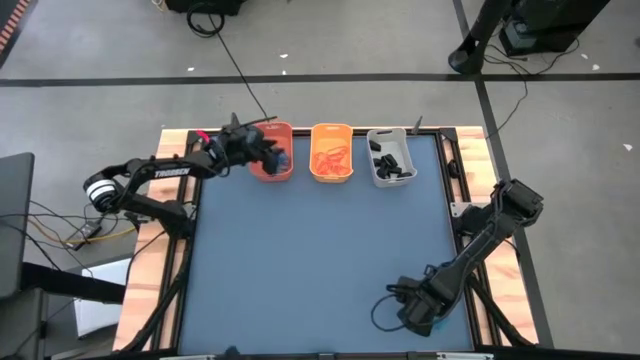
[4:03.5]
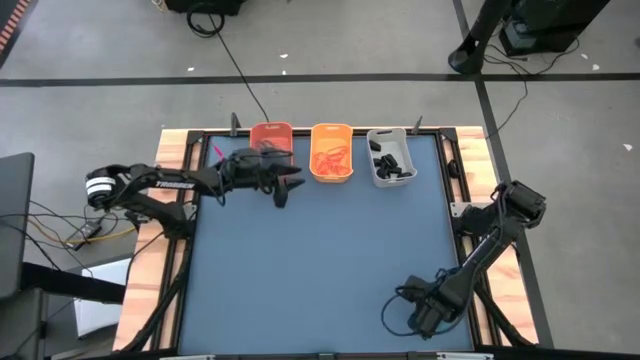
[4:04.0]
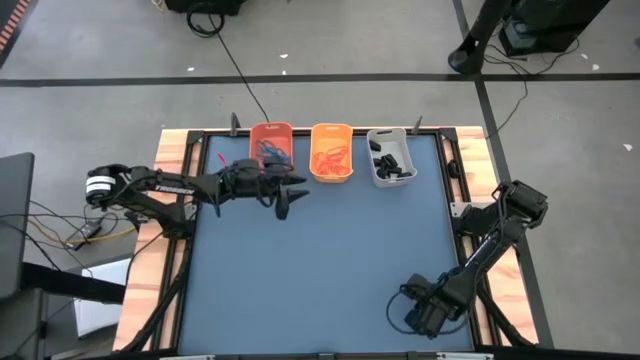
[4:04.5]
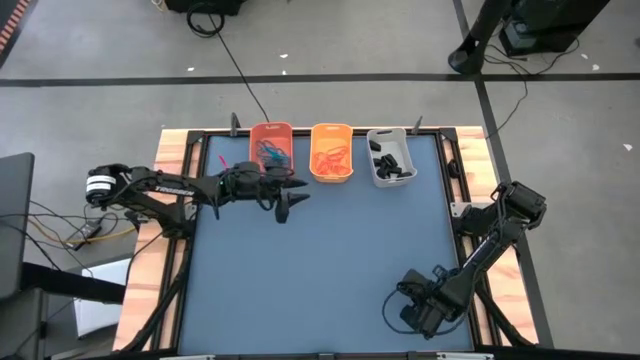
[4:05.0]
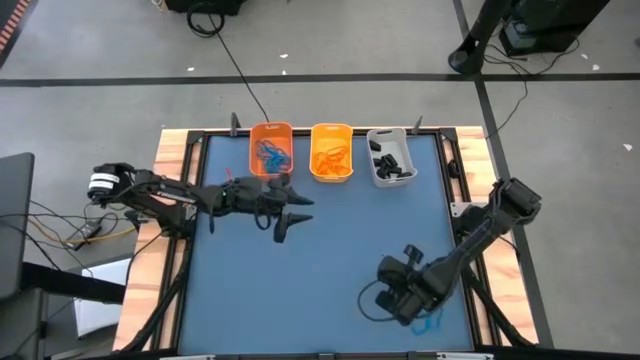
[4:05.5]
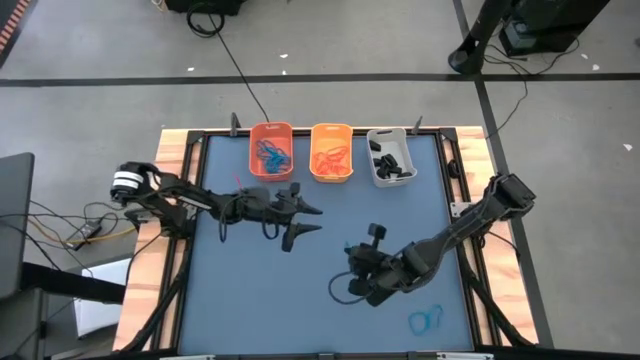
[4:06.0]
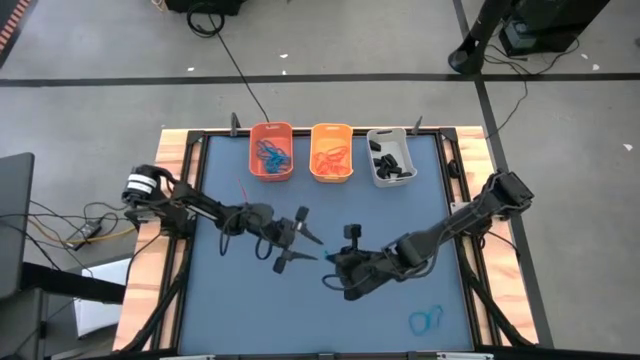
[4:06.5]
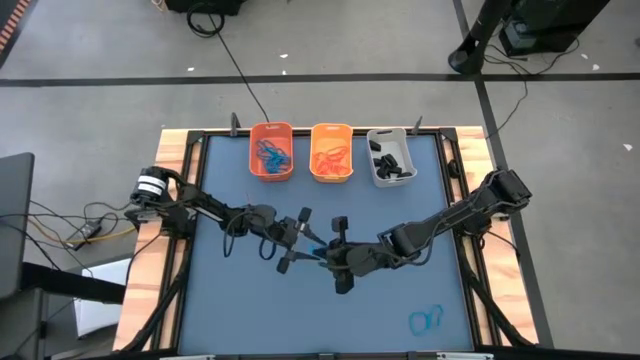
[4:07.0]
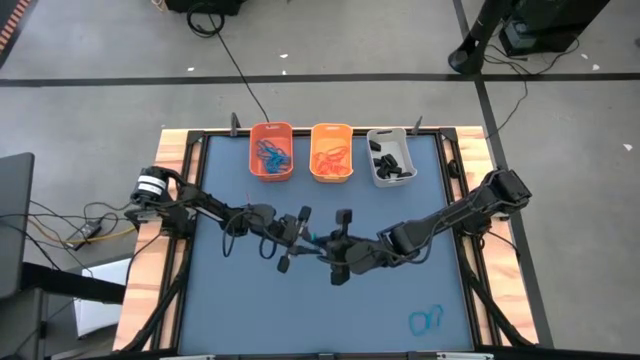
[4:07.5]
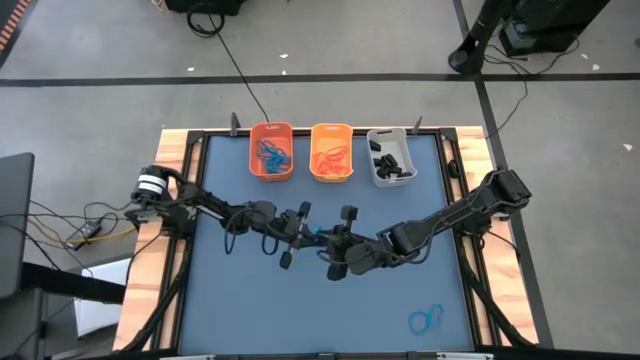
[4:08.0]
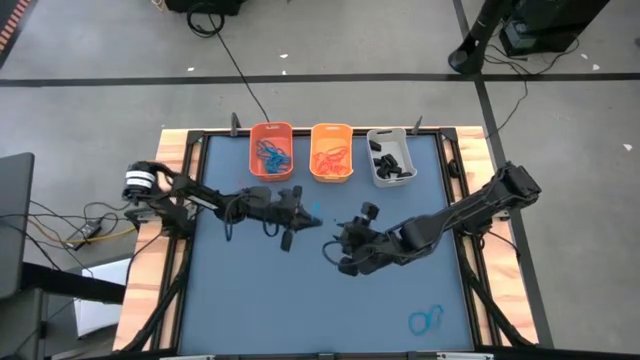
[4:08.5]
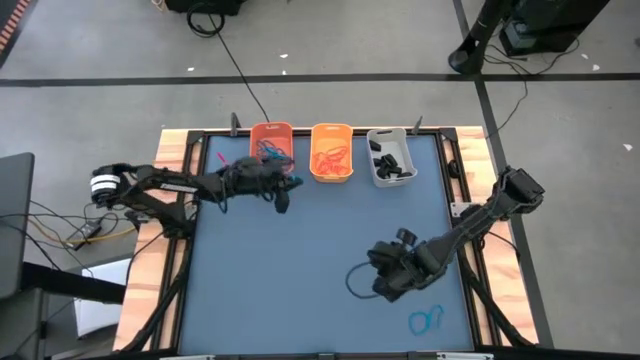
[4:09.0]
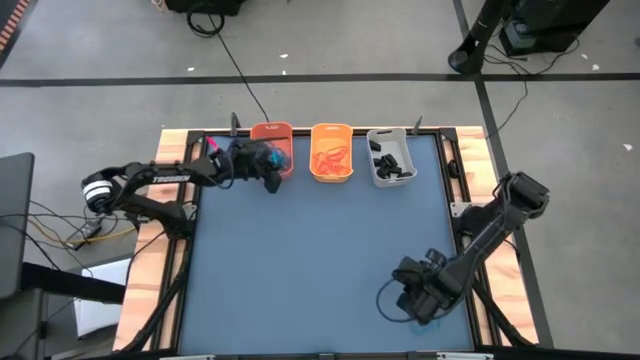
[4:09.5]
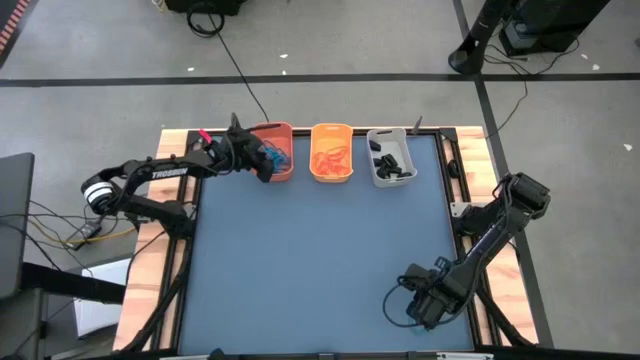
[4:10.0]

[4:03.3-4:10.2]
Task: Sort rubber bands into baskets
Put the blue rubber band into the orange bin

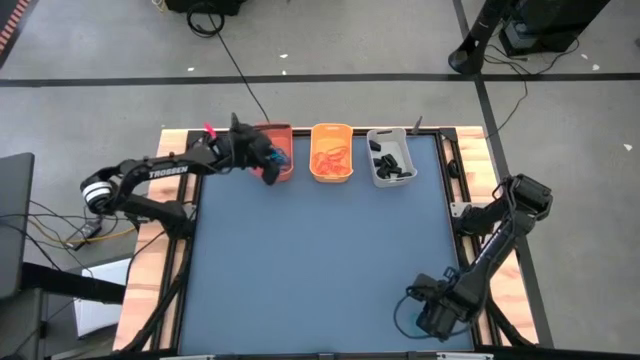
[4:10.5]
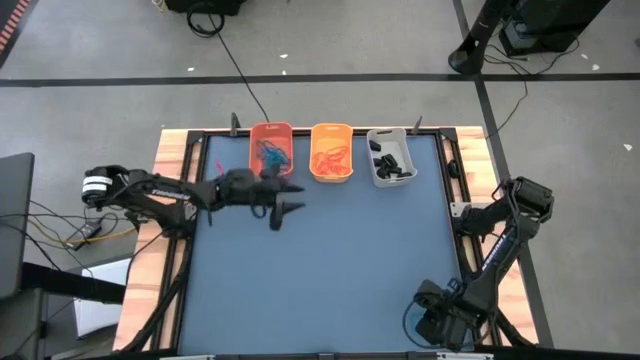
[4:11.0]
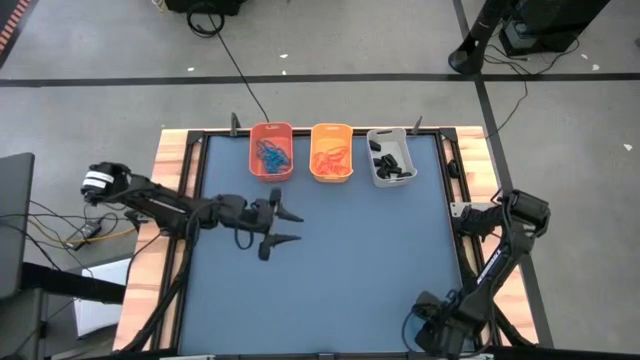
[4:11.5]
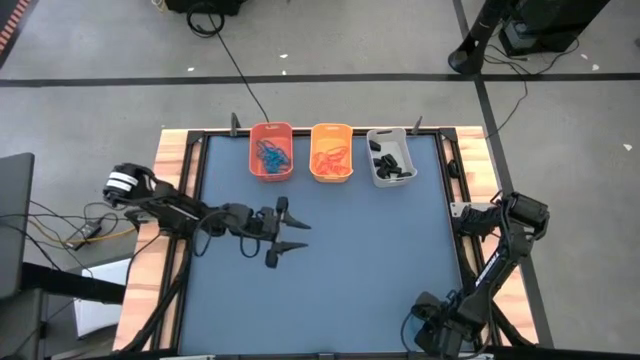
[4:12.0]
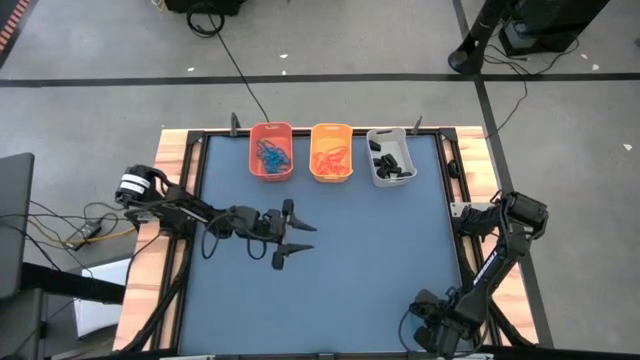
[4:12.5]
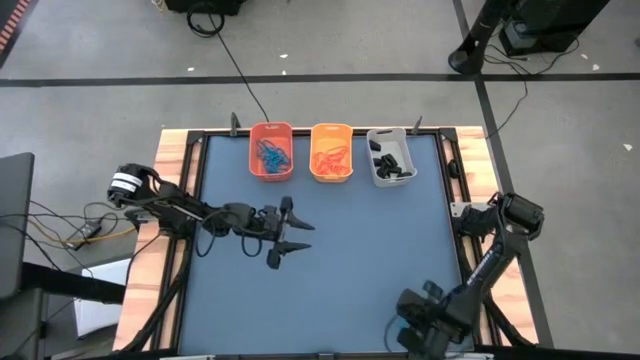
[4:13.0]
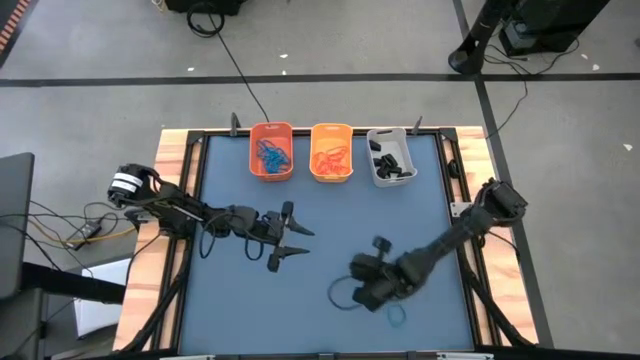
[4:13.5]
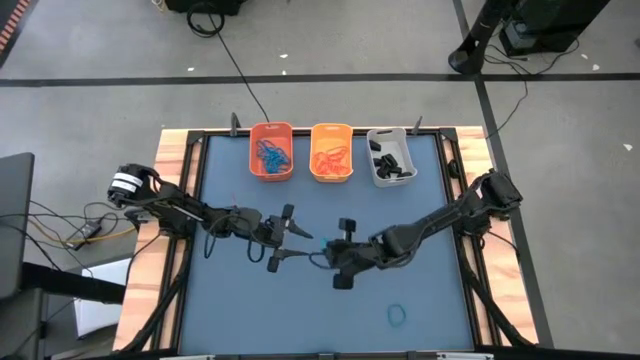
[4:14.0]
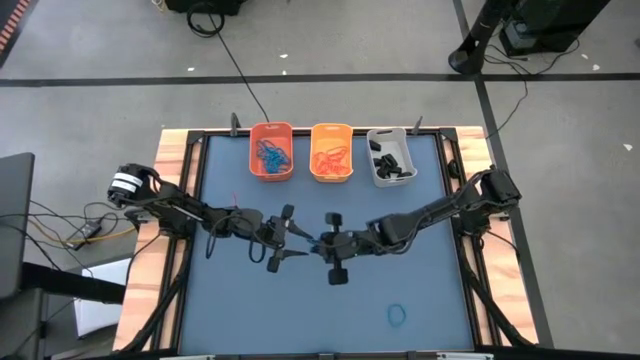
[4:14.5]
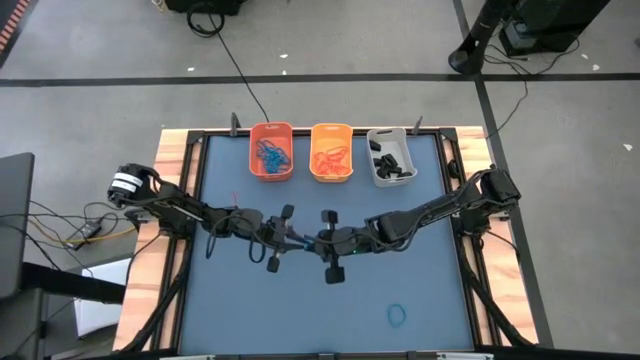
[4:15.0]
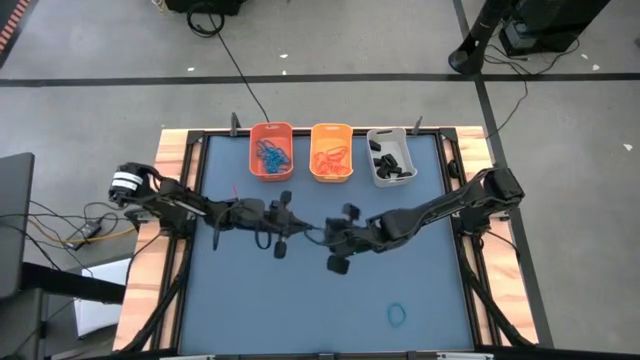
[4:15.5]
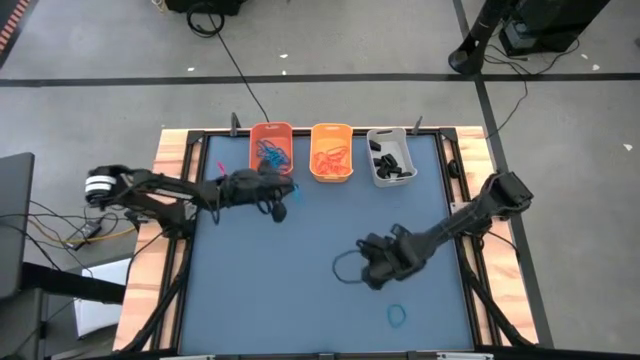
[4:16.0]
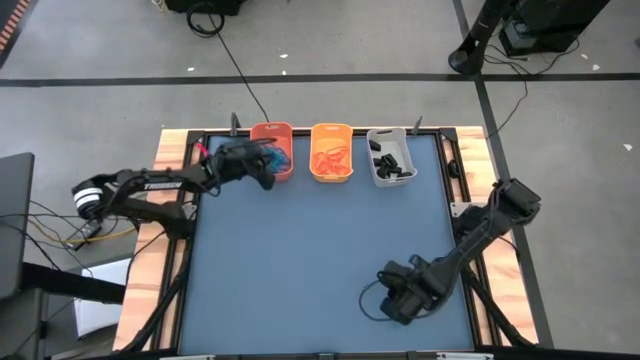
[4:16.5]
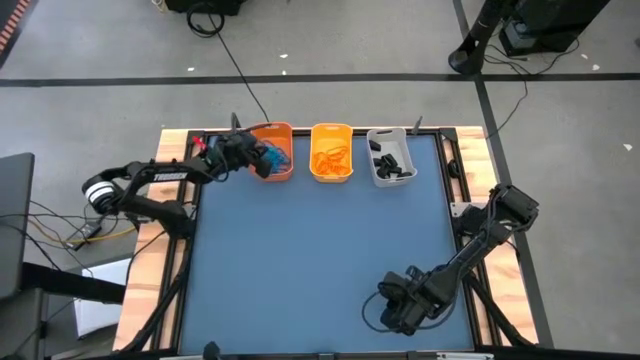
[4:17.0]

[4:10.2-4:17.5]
Put the blue rubber band into the orange bin

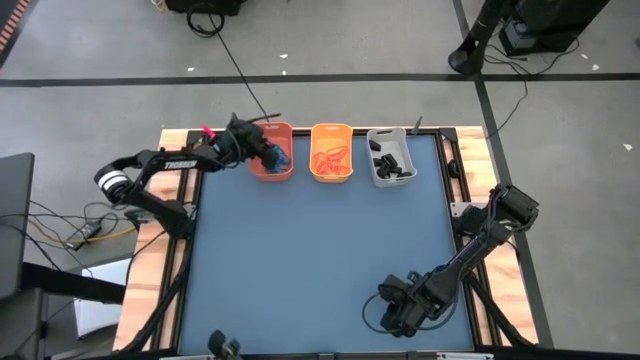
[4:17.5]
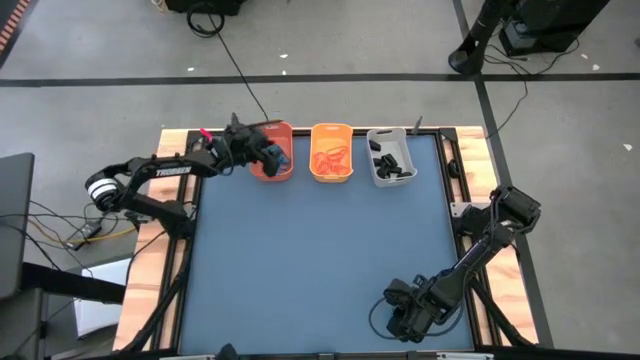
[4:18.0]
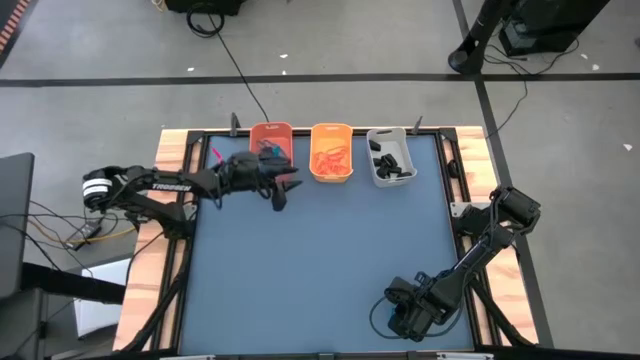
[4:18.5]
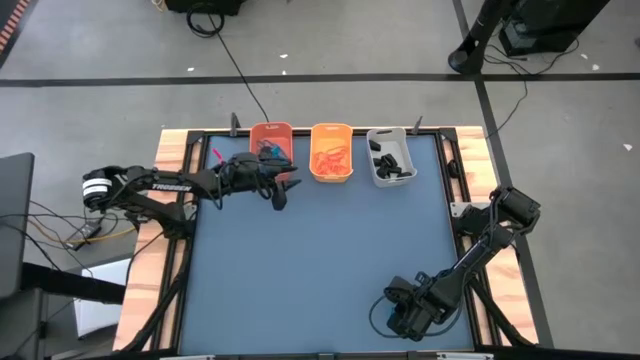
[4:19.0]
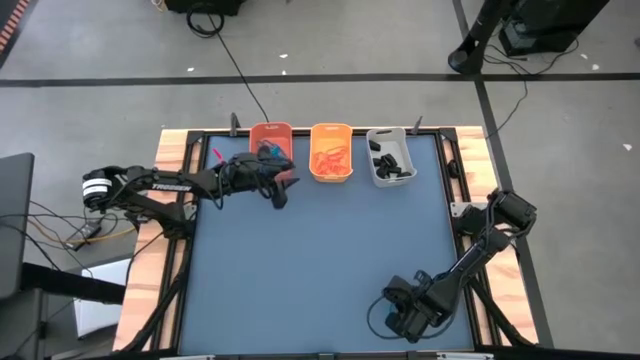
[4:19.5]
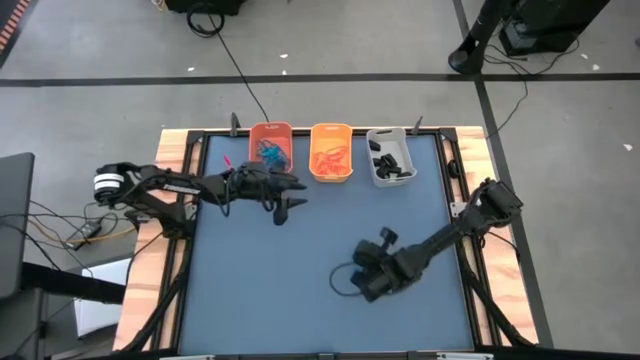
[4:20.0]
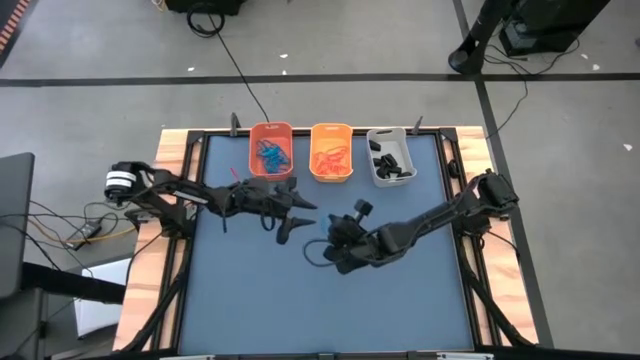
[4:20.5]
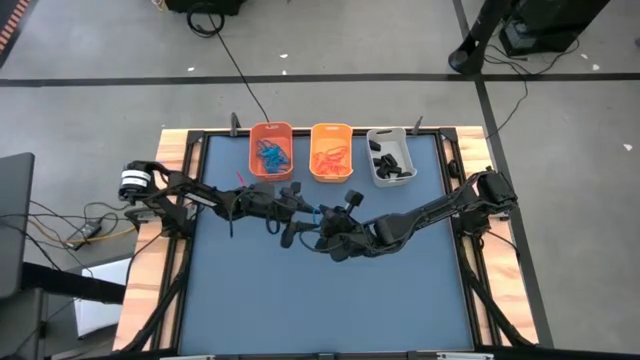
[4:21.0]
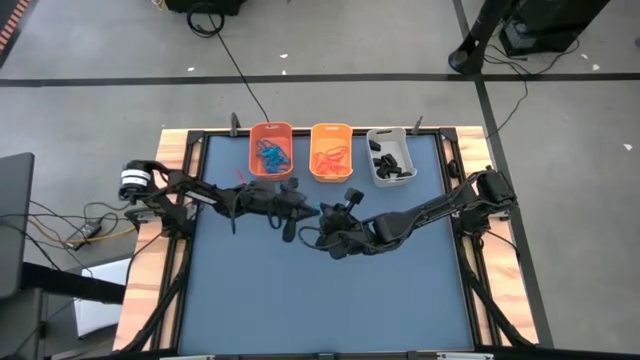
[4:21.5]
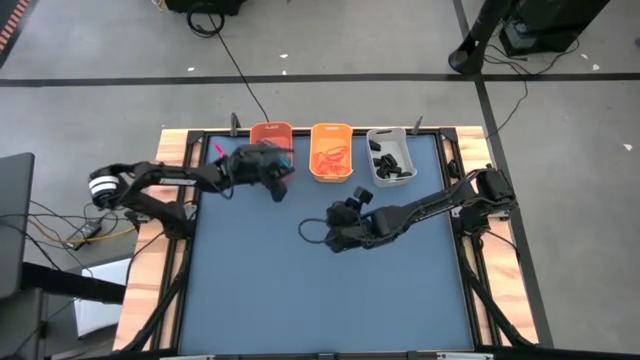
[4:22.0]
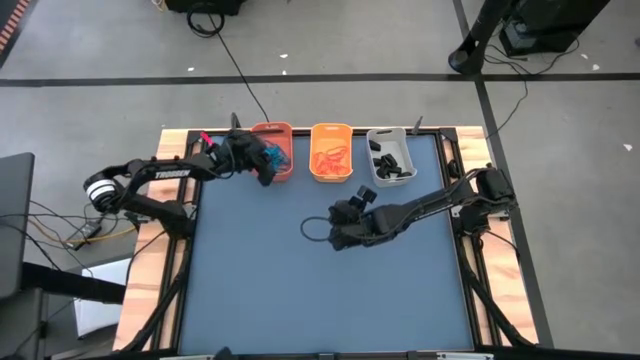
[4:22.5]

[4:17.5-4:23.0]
Put the blue rubber band into the orange bin

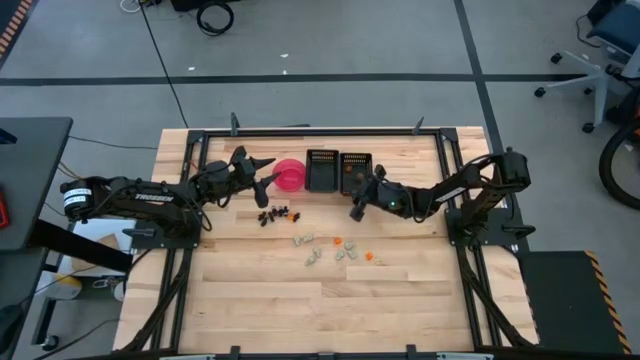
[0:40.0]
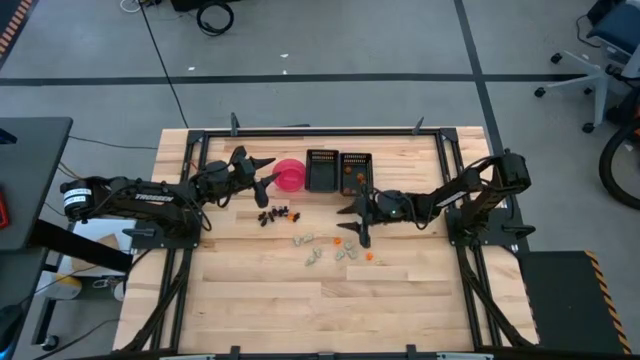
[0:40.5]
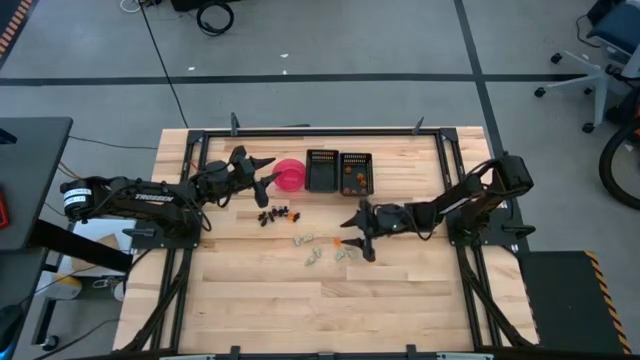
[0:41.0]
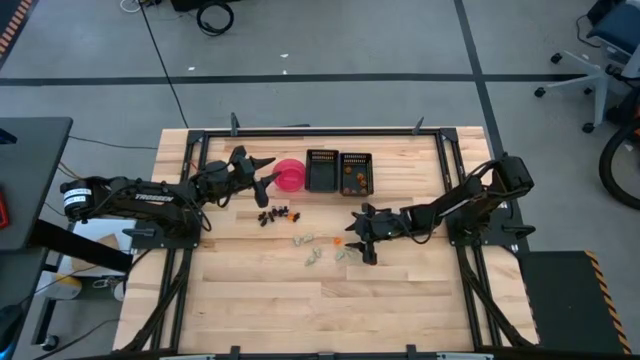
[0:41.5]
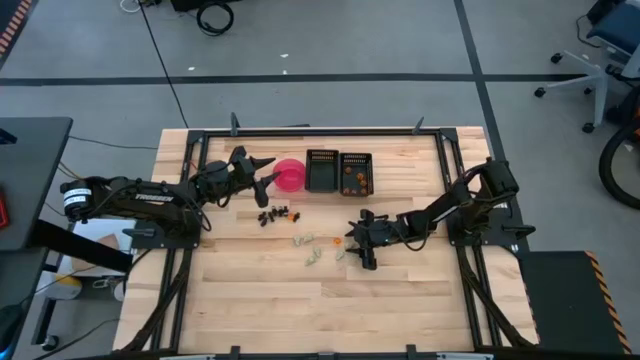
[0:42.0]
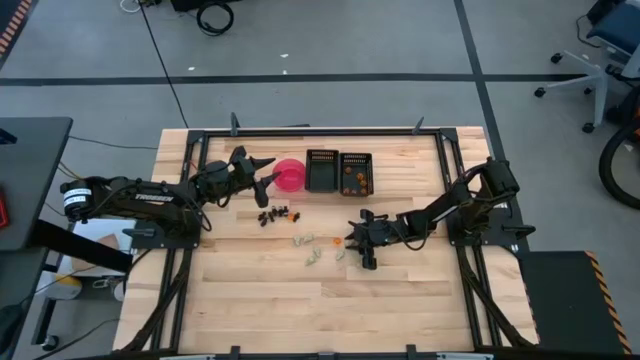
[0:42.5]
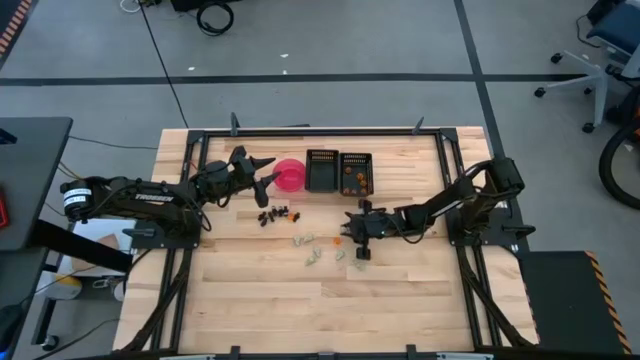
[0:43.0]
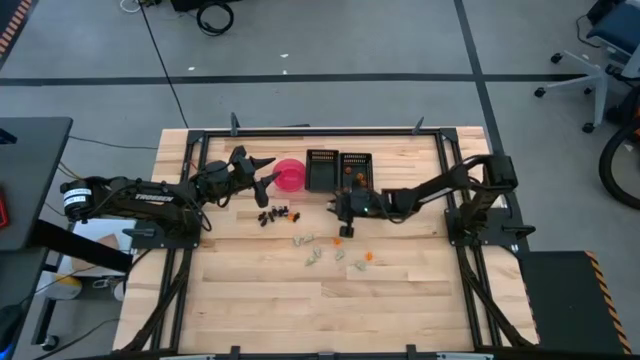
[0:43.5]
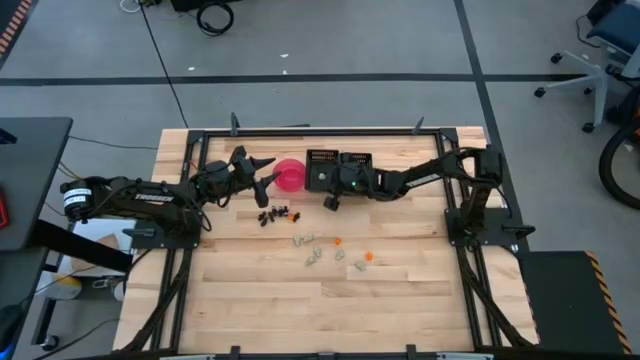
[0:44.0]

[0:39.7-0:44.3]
Task: Sort Halloween decoration
Put the white skull toy into the left black bin
